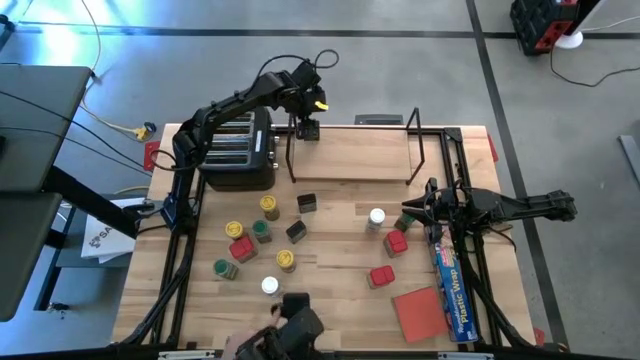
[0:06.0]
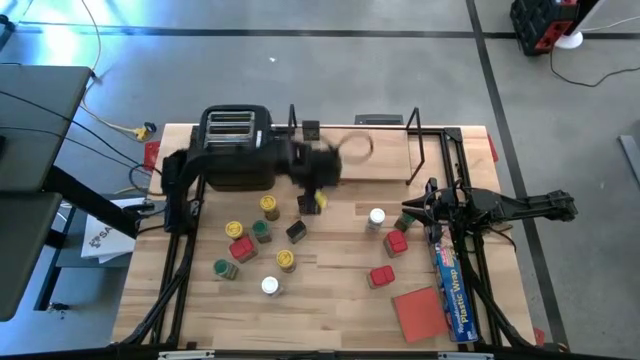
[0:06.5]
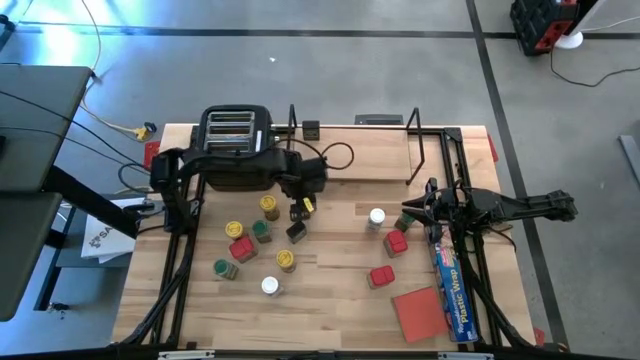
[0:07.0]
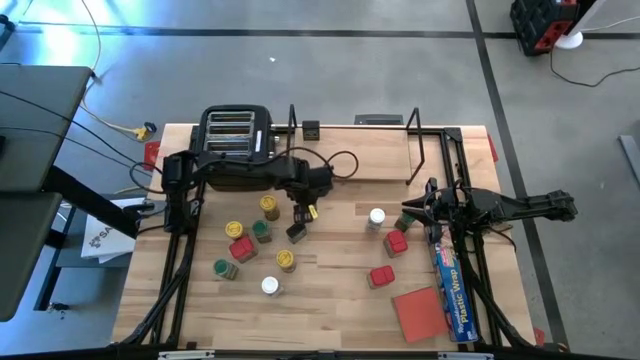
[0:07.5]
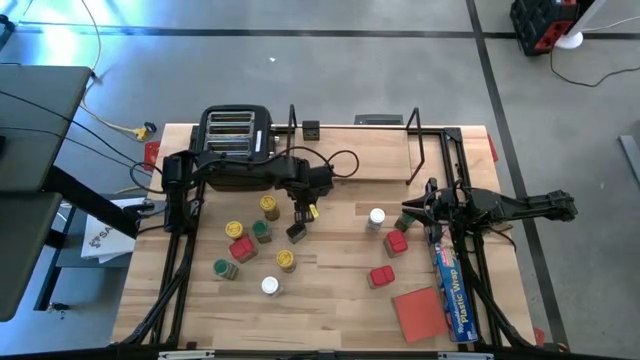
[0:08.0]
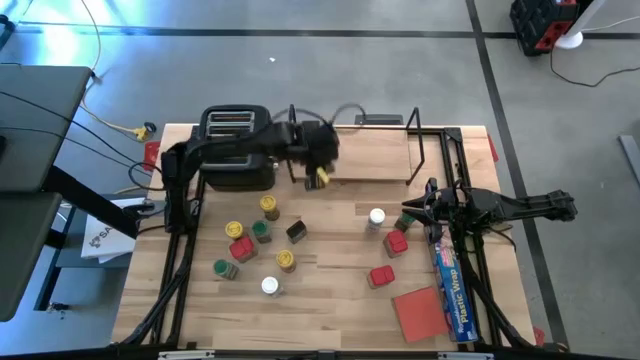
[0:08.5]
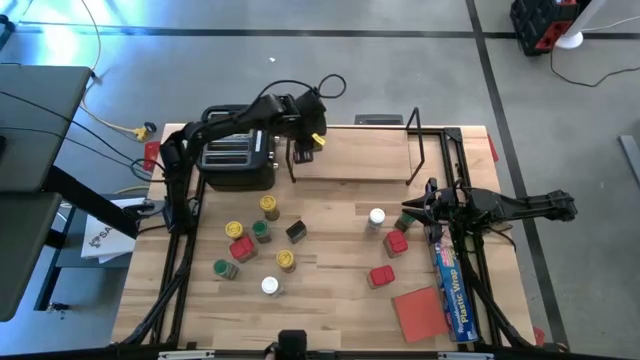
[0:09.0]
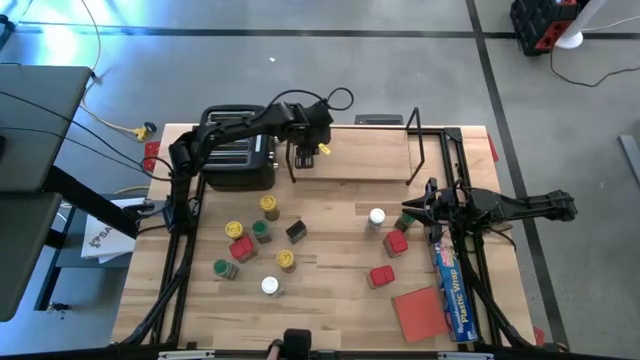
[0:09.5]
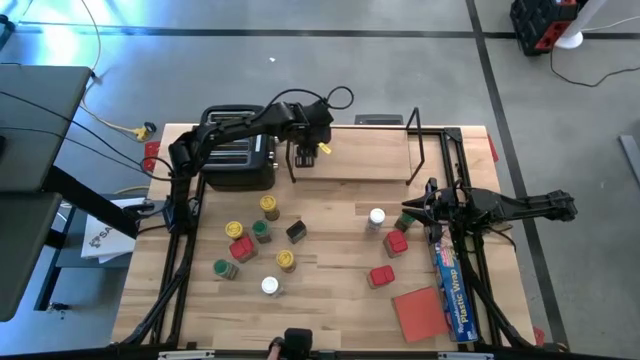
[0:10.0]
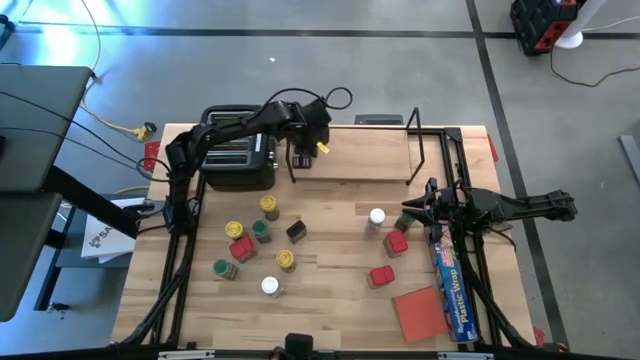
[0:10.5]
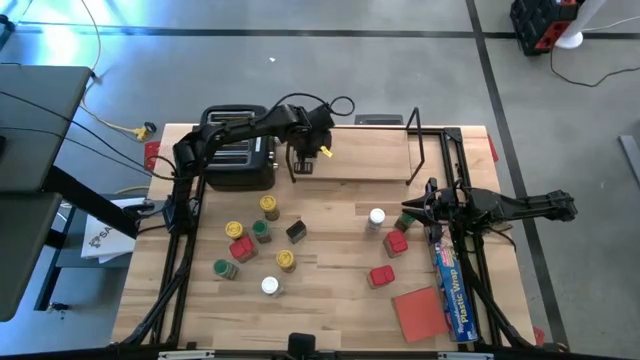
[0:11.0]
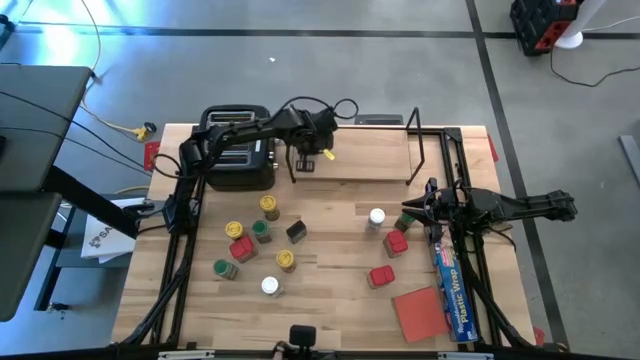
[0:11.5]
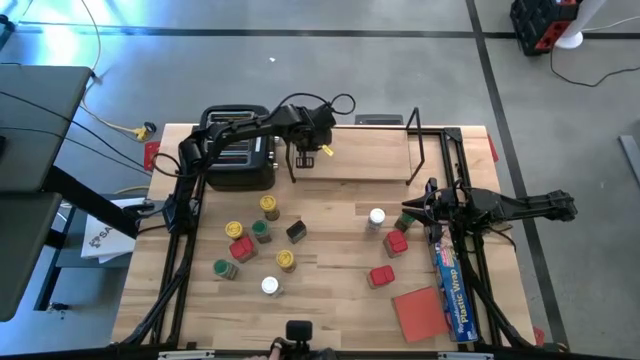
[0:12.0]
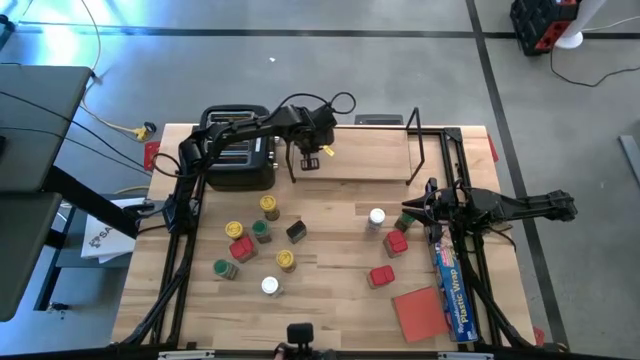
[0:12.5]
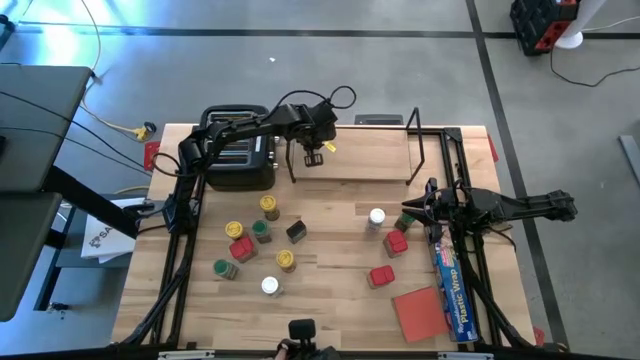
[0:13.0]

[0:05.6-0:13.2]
Task: Shelf spices
Put the top black seasoning can on the shelf aligned with the other black seasoning can

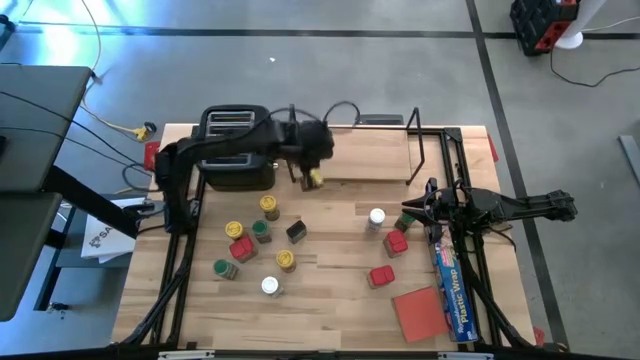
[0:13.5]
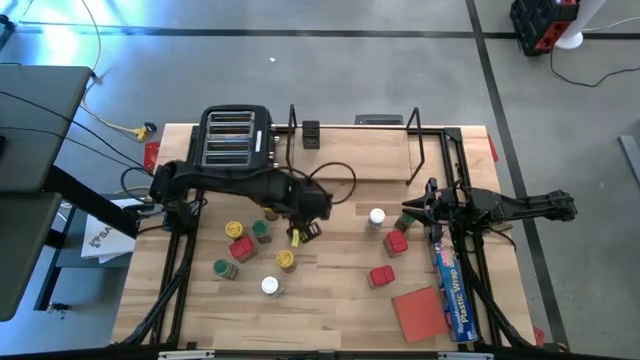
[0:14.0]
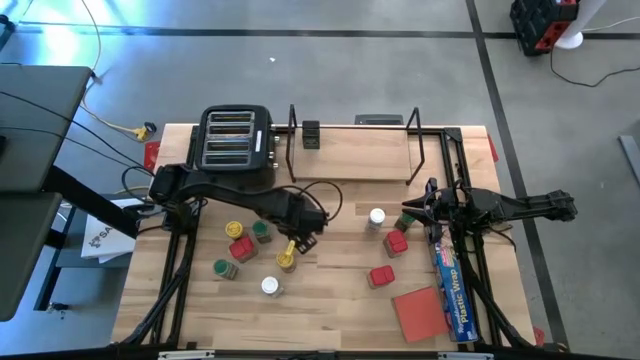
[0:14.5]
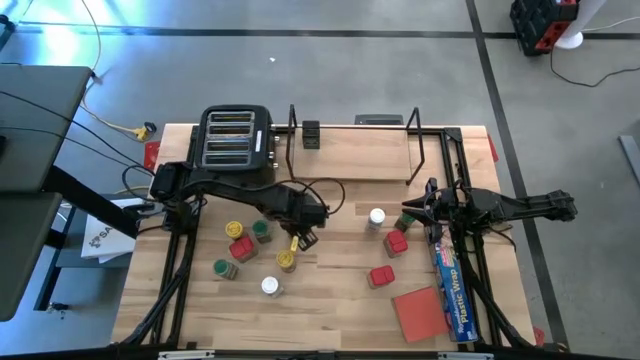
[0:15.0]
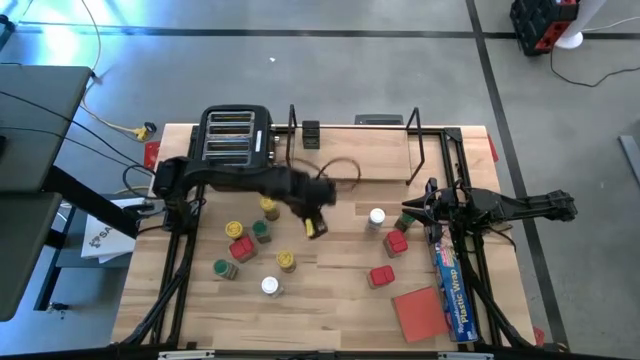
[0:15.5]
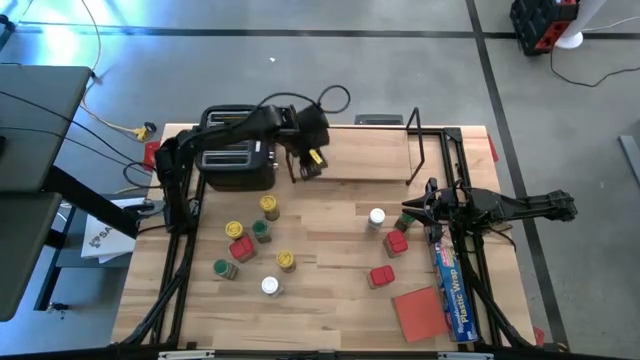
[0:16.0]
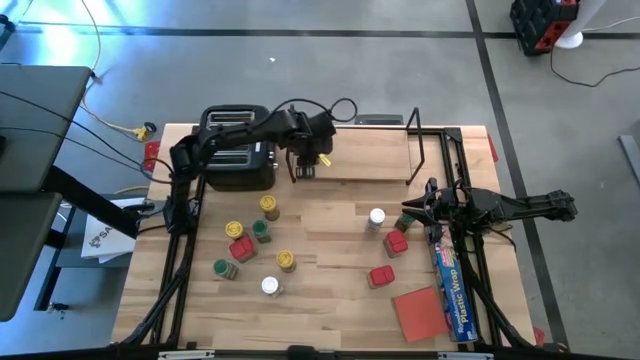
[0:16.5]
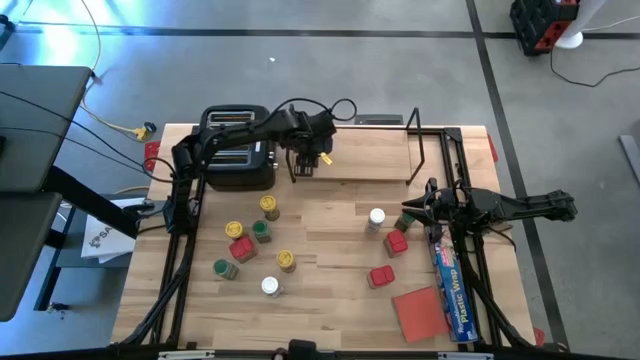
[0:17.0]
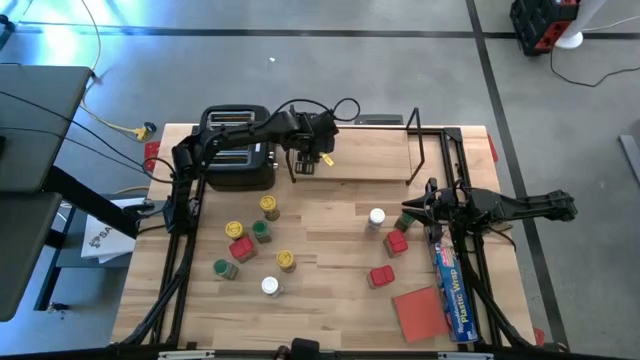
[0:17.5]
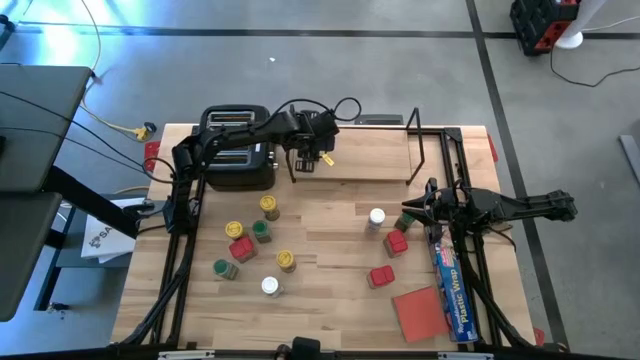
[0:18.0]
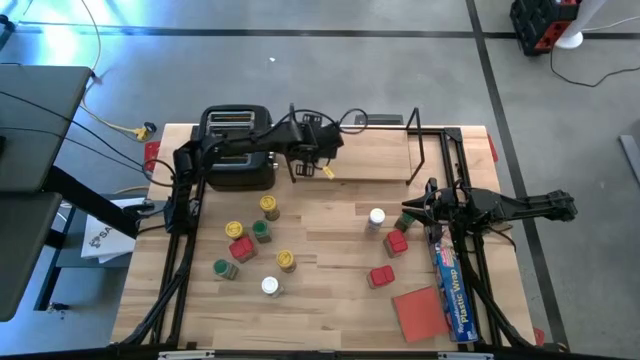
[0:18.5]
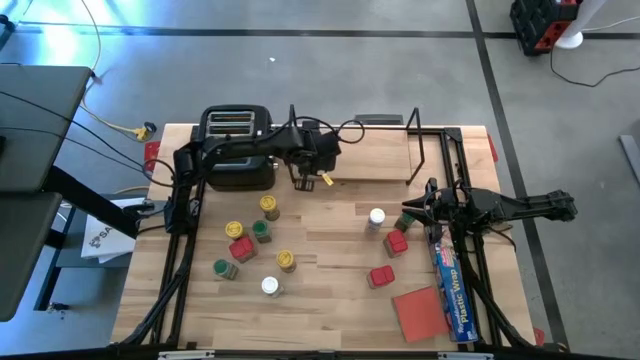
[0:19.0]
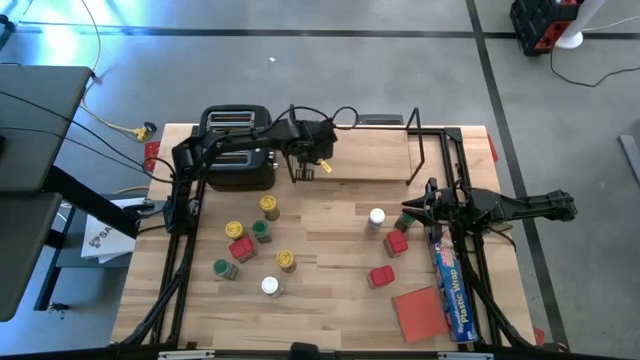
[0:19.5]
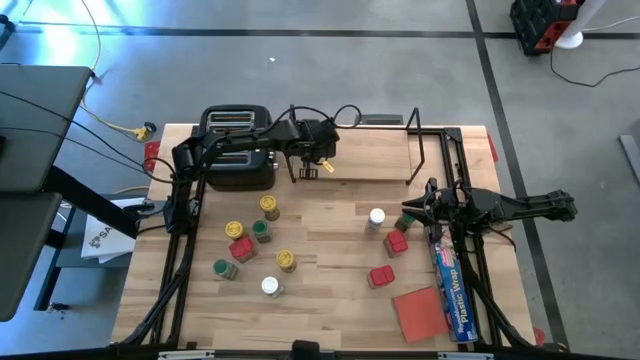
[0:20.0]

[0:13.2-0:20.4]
Put the black seasoning can on the shelf aligned with the other black seasoning cans

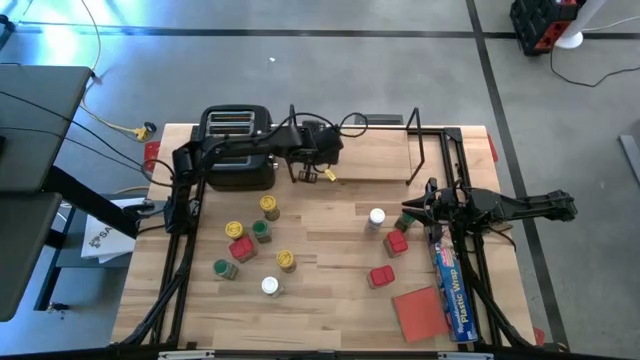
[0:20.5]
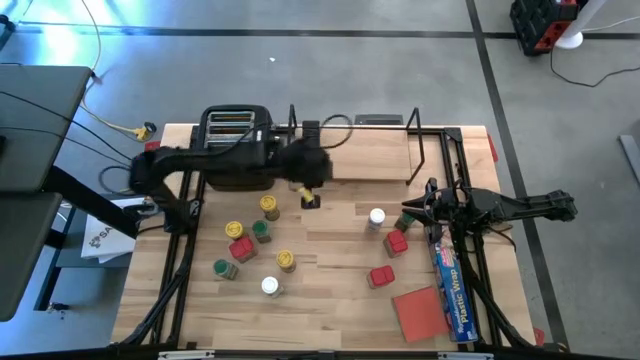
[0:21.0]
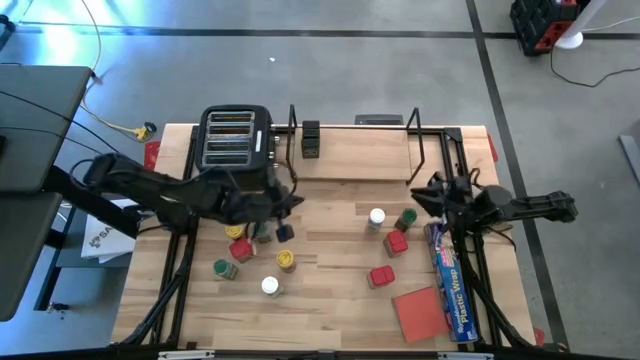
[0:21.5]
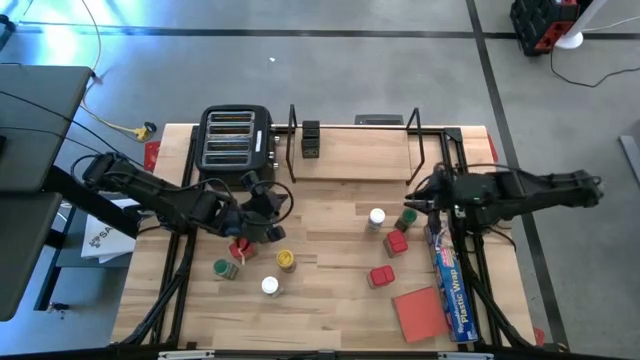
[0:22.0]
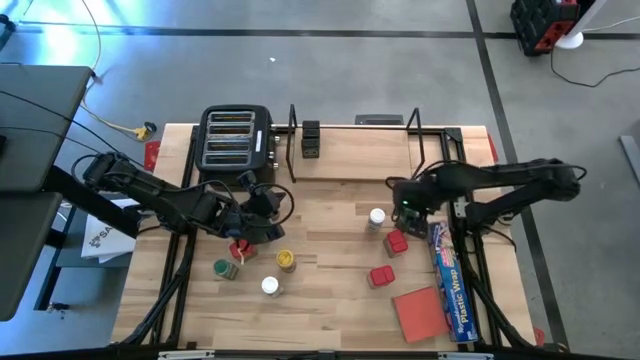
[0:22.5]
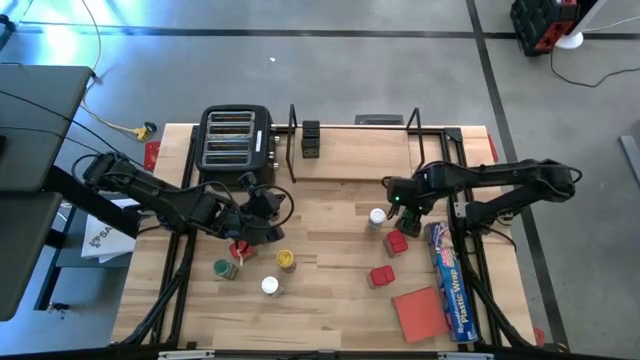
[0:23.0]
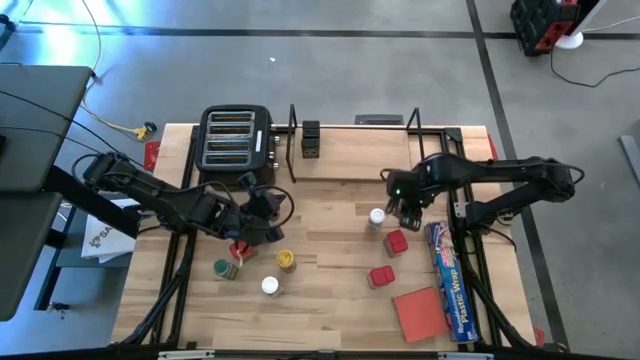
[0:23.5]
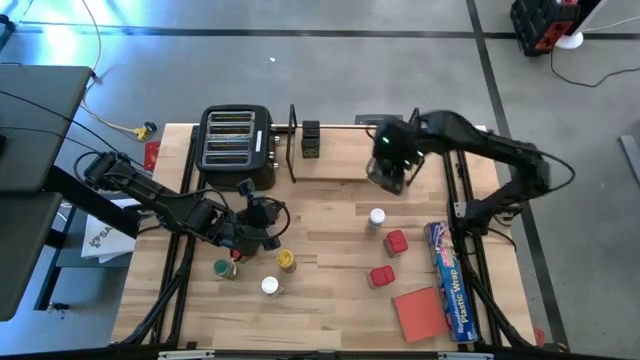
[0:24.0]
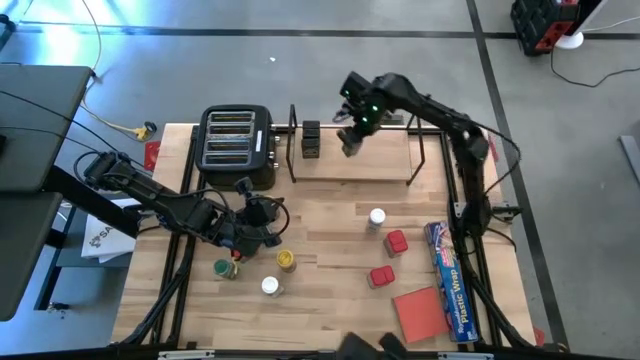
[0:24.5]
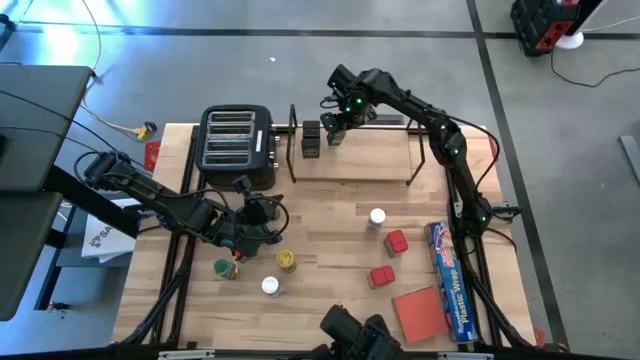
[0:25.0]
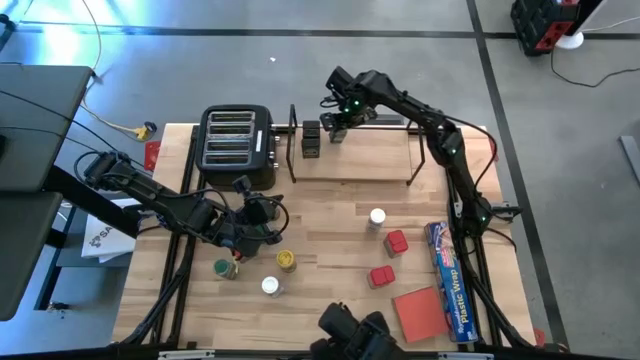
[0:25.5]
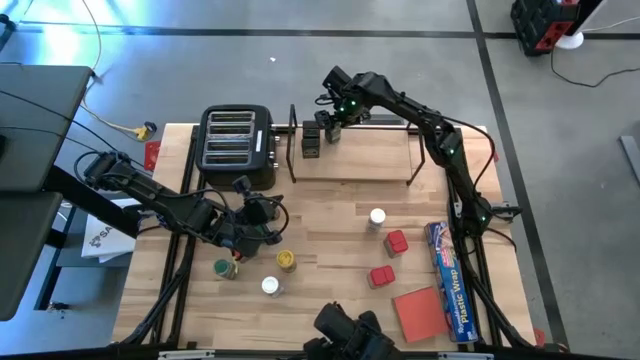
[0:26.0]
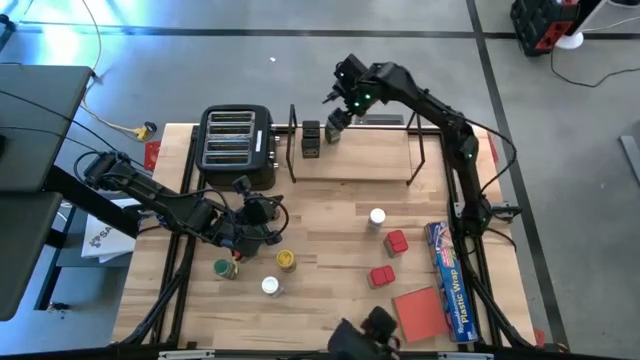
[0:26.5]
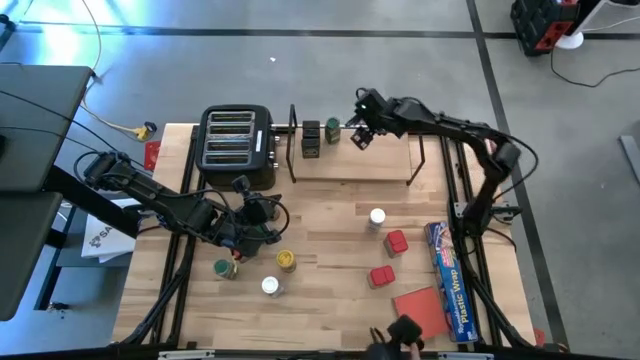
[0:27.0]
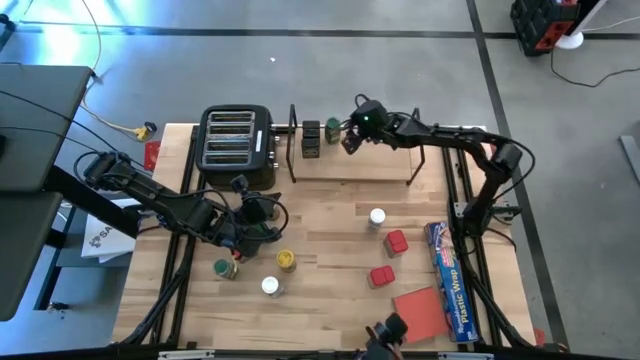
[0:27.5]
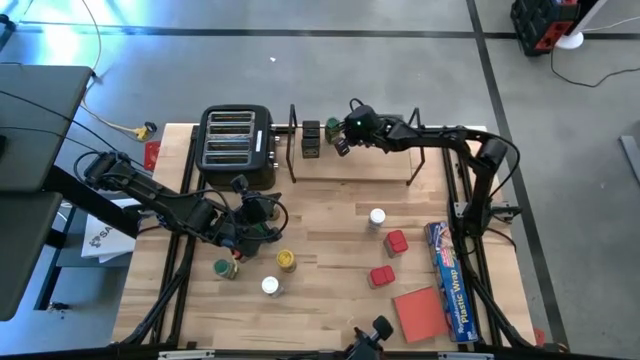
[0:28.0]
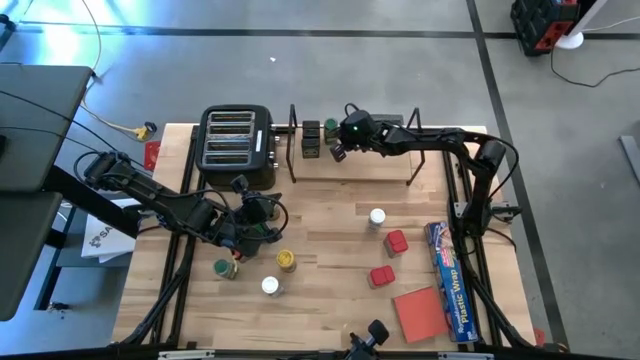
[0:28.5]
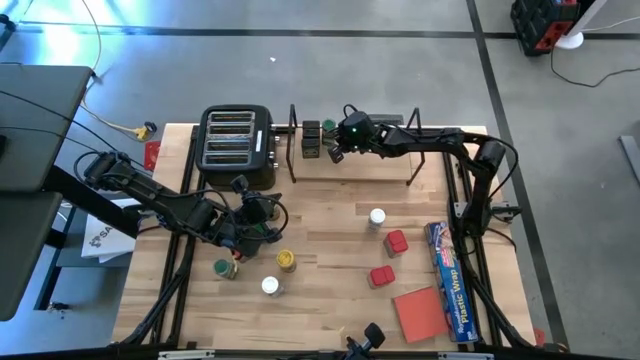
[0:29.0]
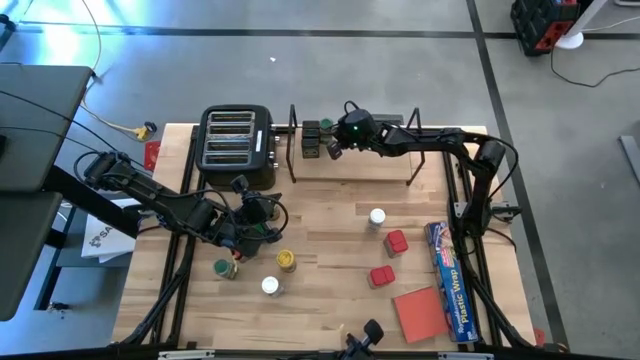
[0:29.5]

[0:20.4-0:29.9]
Put the top right green seasoning bottle on the shelf
